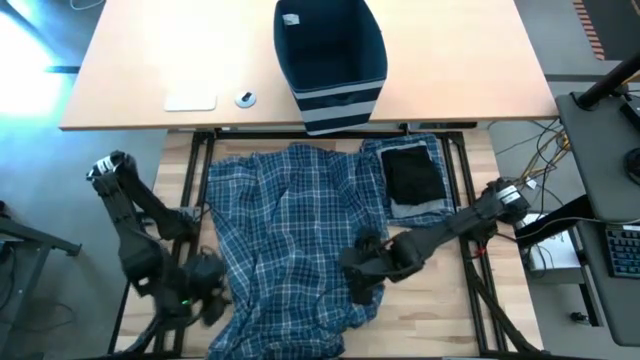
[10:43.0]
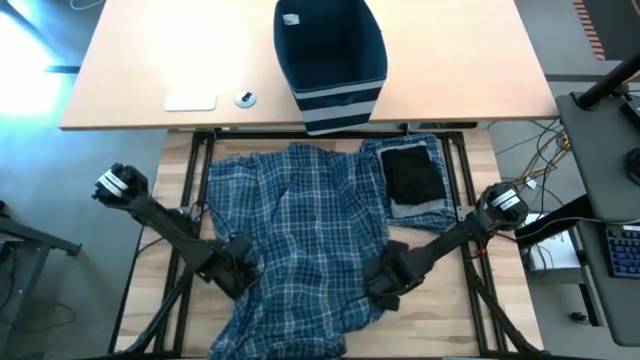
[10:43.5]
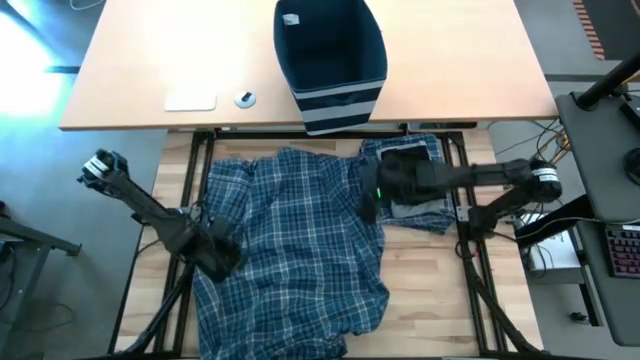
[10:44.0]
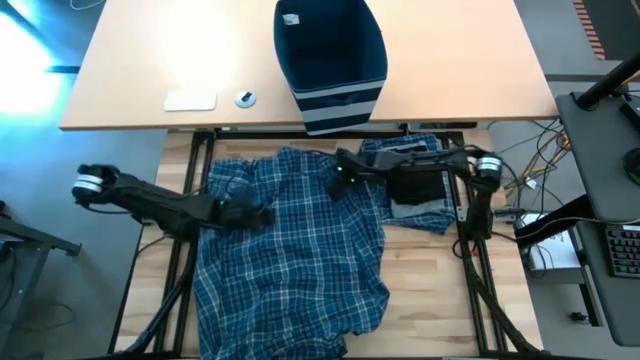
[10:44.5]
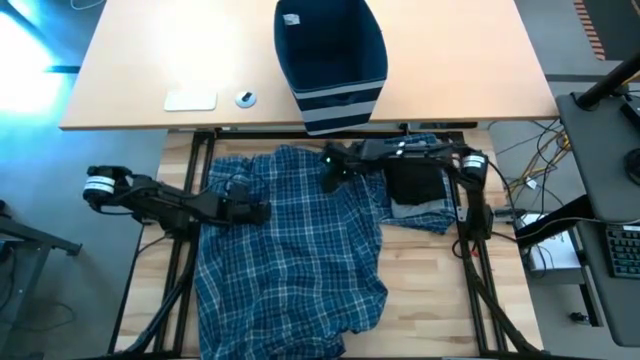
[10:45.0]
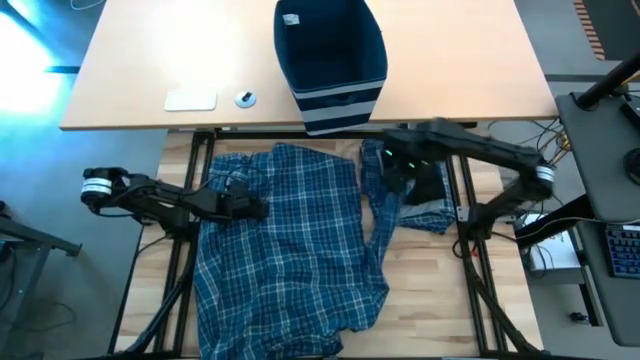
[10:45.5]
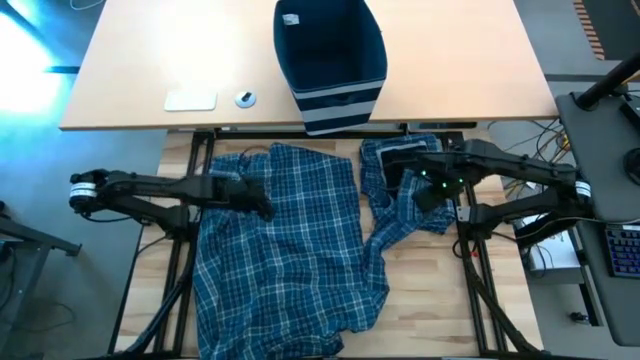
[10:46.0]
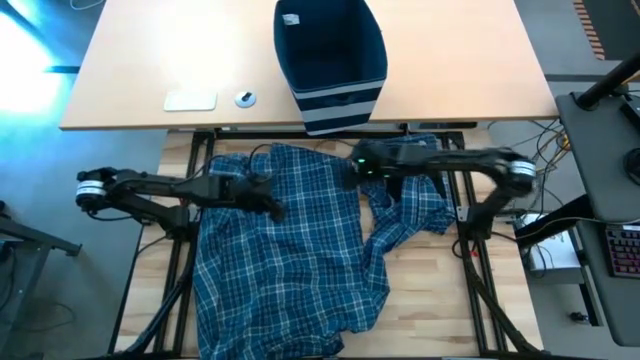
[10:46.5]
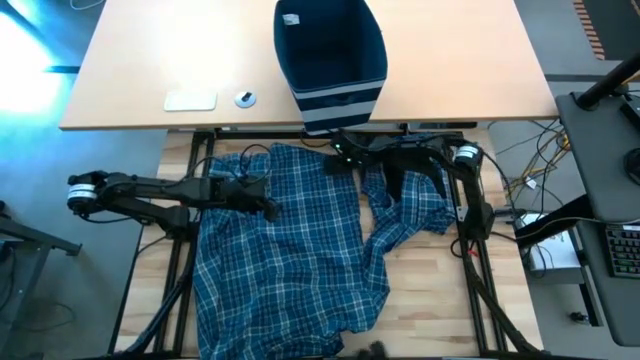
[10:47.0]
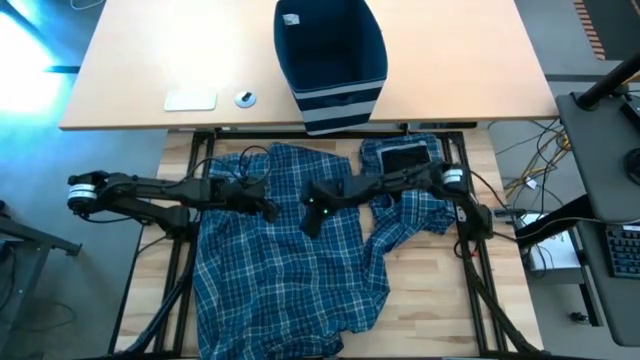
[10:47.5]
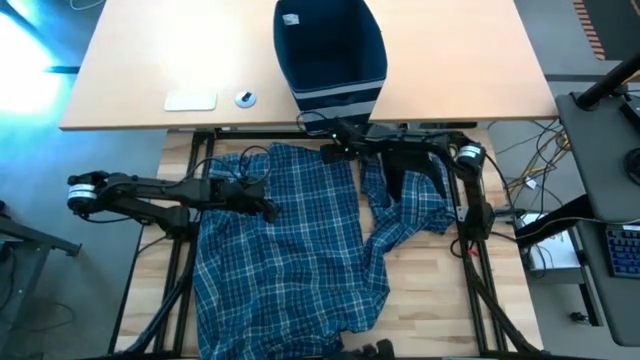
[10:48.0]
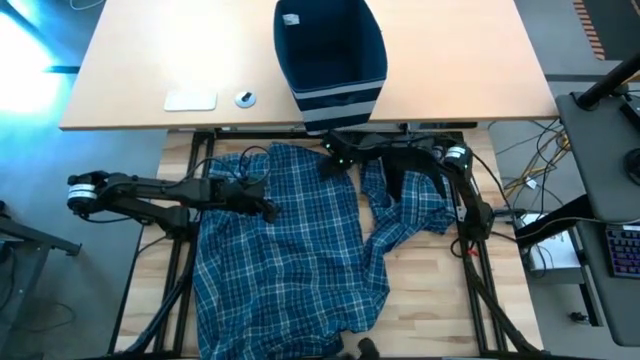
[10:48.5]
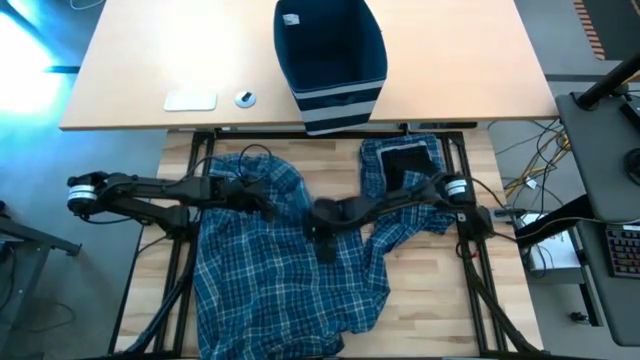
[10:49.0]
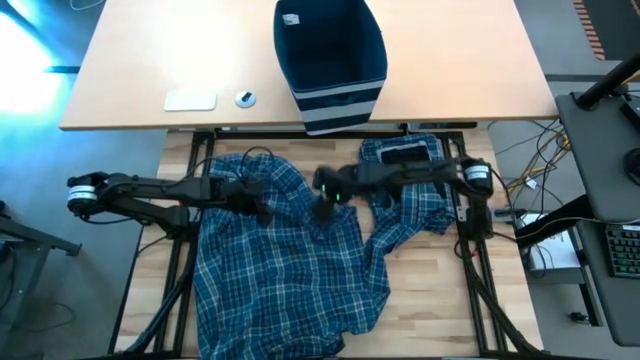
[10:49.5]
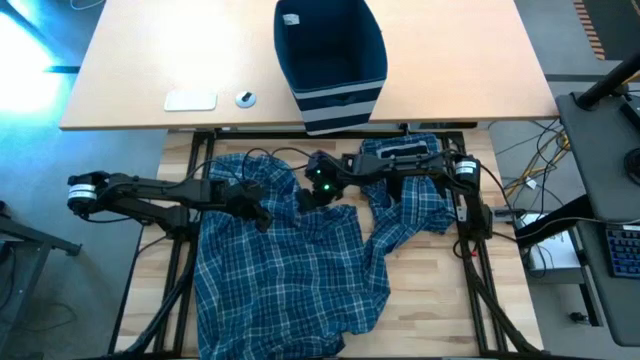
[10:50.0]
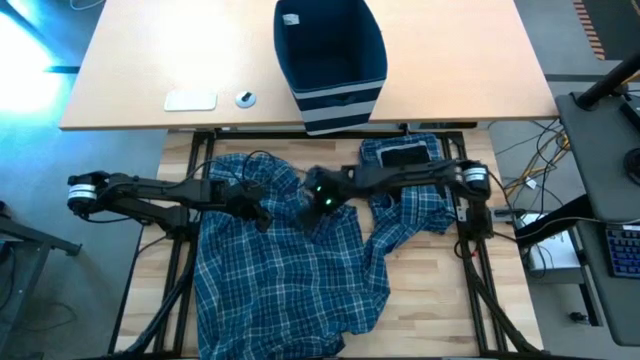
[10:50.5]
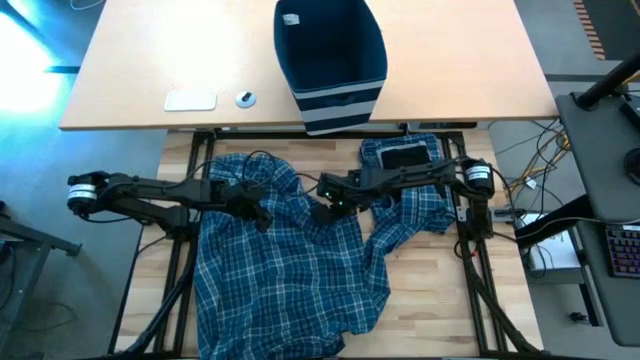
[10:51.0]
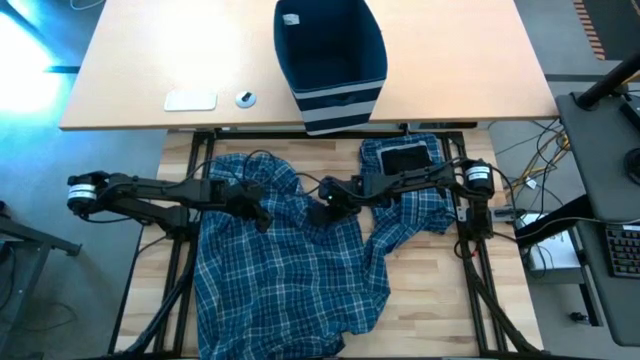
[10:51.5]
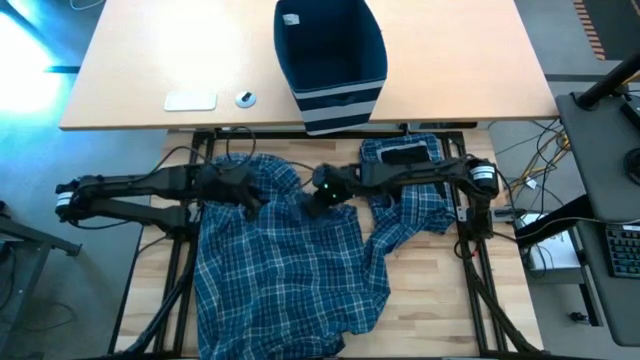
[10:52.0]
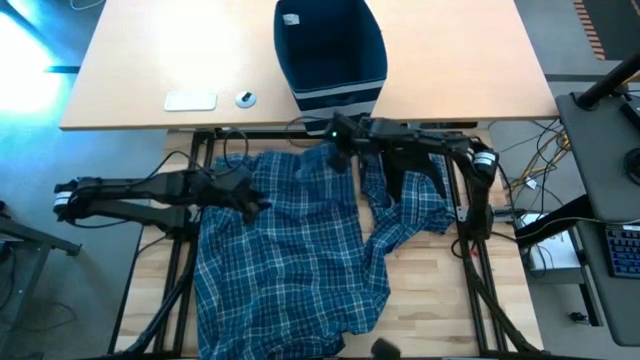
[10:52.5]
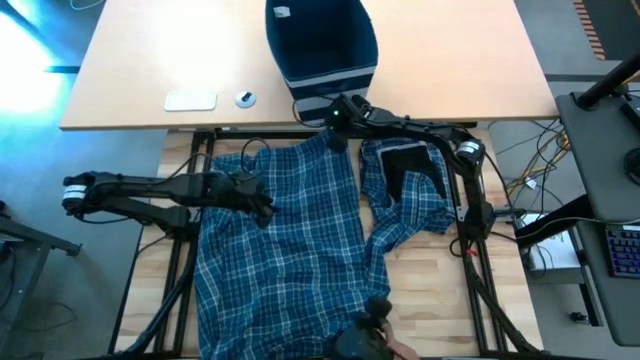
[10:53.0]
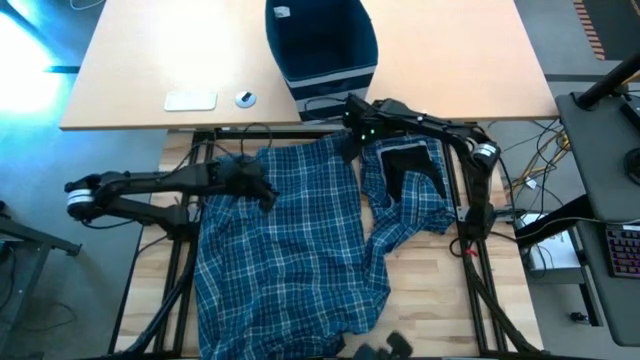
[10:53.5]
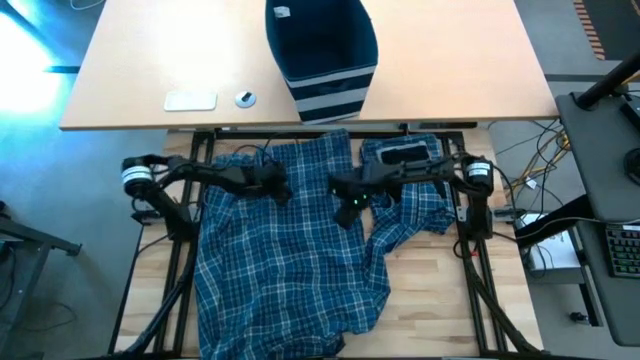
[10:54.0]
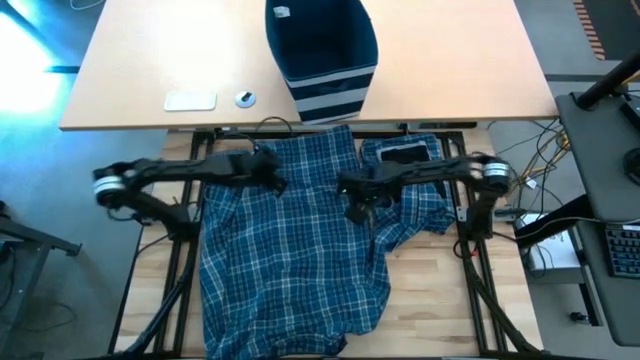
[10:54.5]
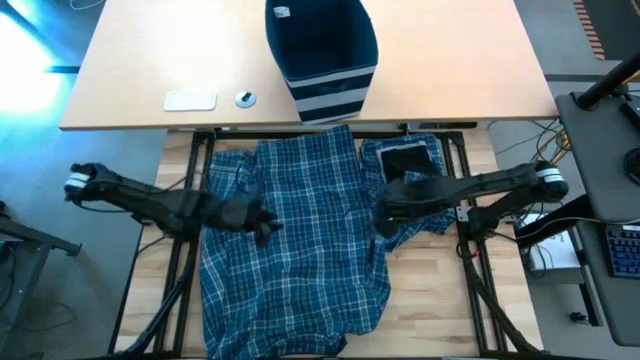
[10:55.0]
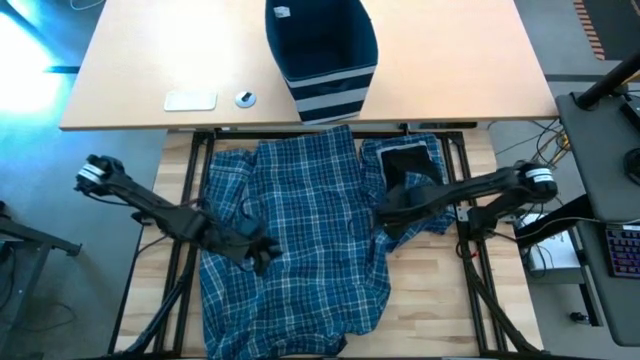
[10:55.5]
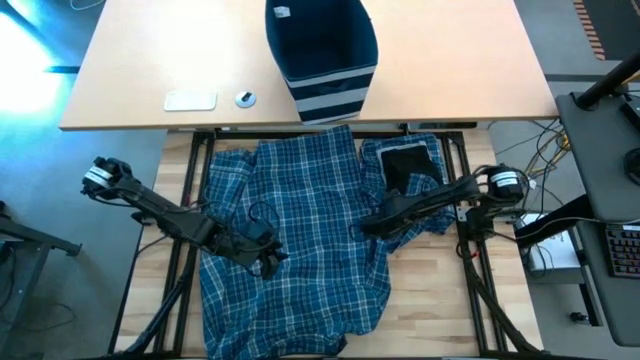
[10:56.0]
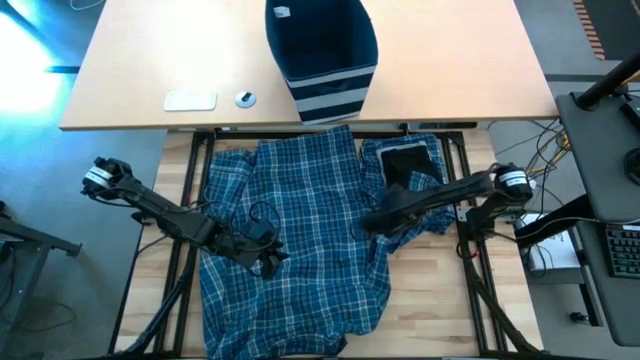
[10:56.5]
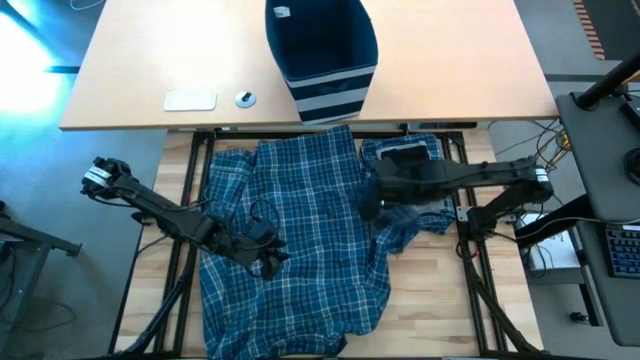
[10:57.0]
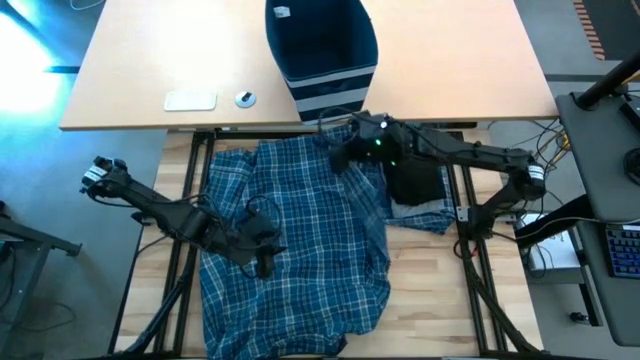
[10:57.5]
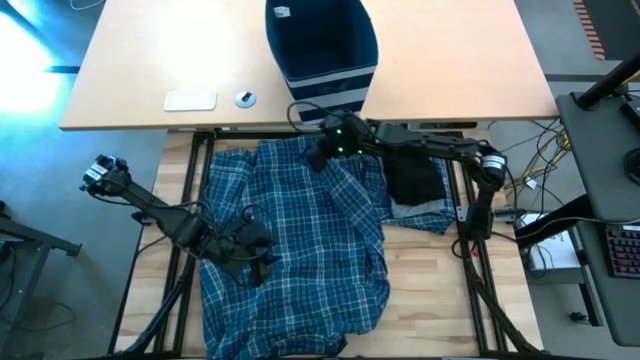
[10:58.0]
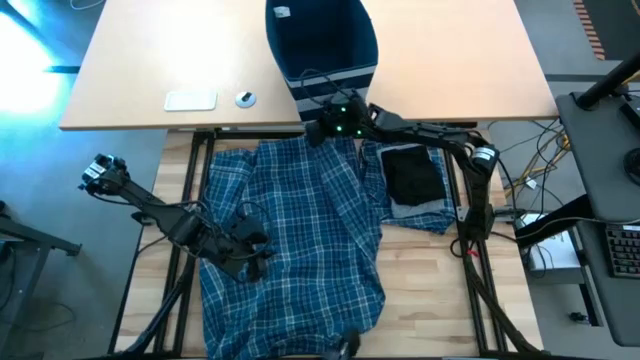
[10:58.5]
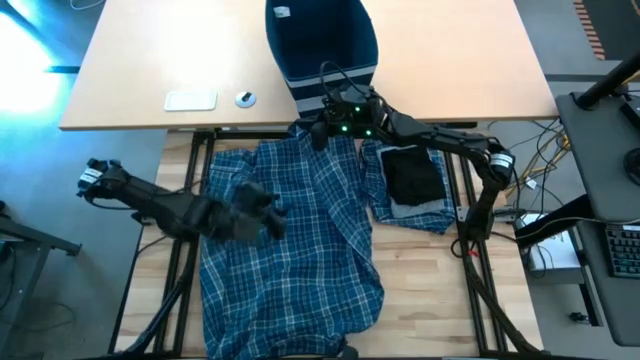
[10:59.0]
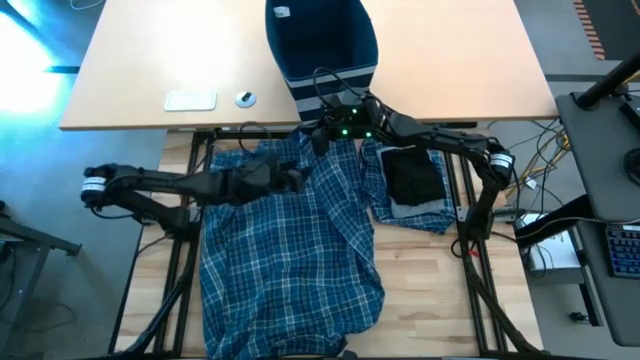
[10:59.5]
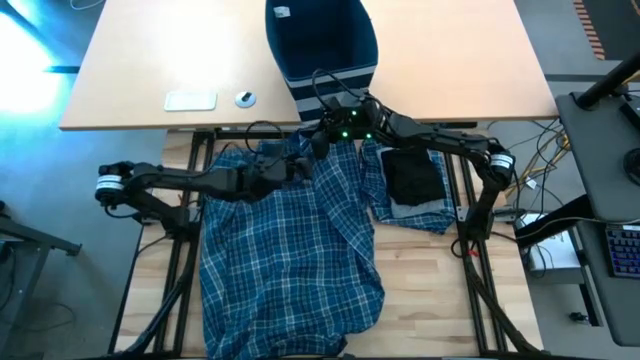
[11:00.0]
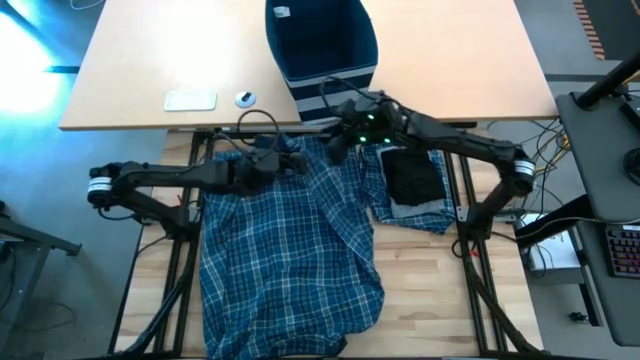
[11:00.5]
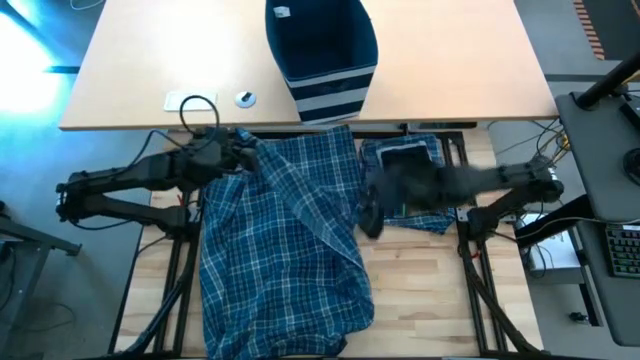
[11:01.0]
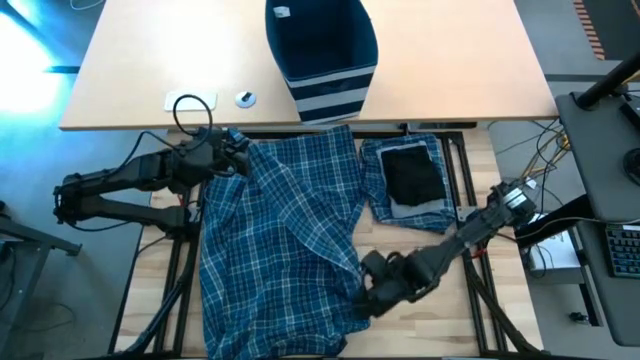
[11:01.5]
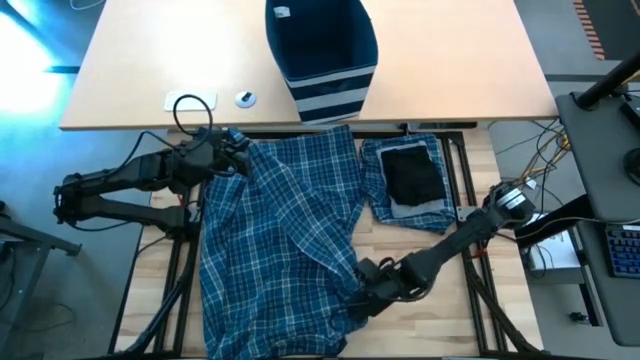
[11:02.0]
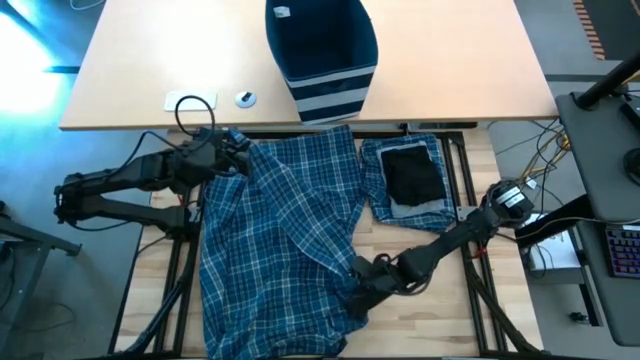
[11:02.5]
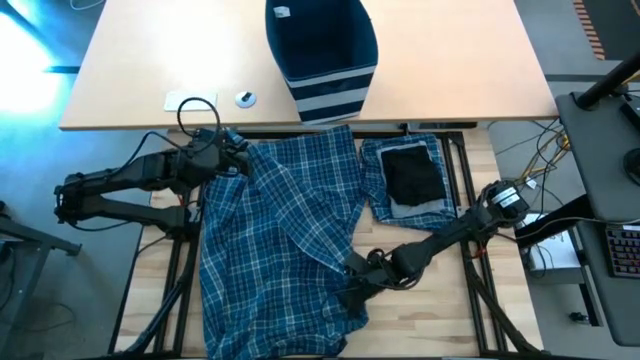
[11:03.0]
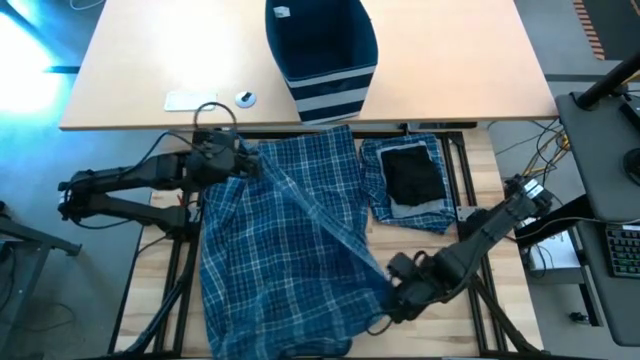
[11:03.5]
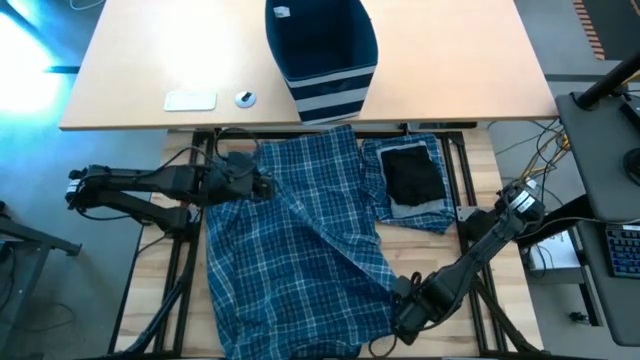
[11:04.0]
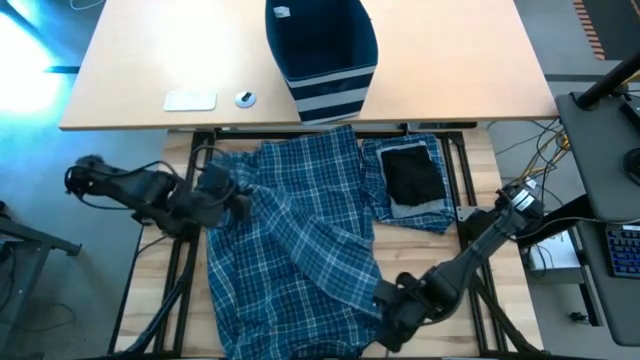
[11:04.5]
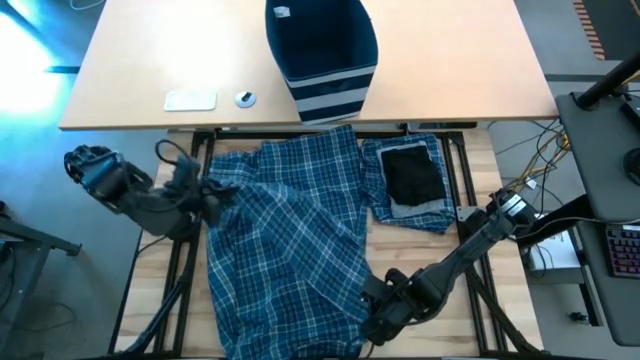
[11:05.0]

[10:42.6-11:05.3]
Task: Fold Laundry from Bin
Fold the blue patterned long sleeve
